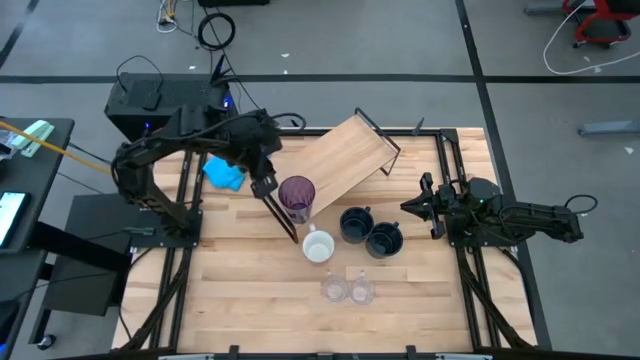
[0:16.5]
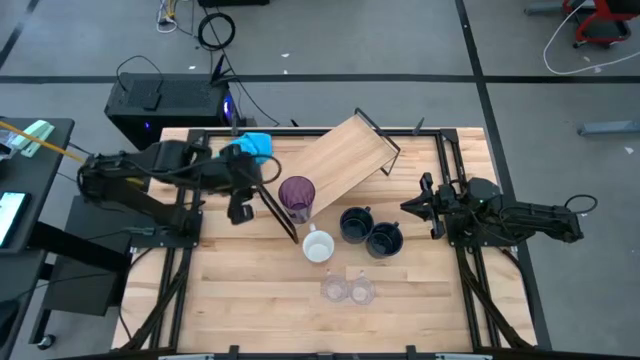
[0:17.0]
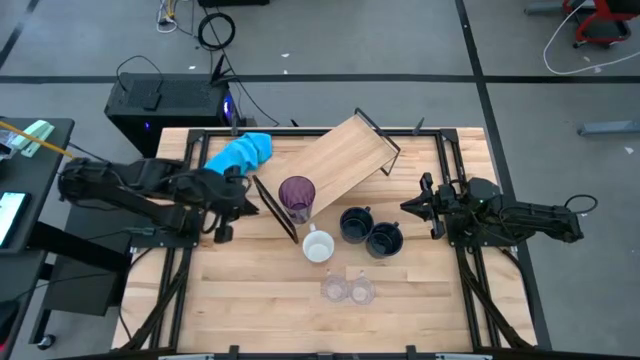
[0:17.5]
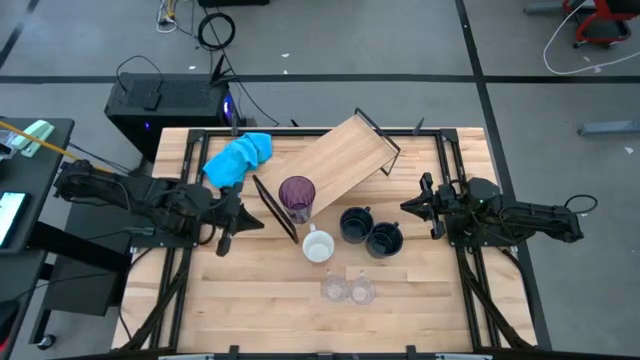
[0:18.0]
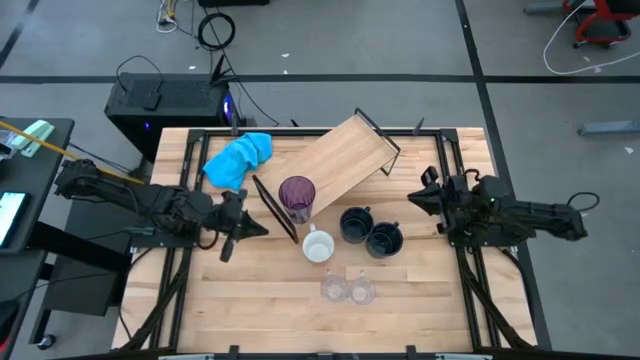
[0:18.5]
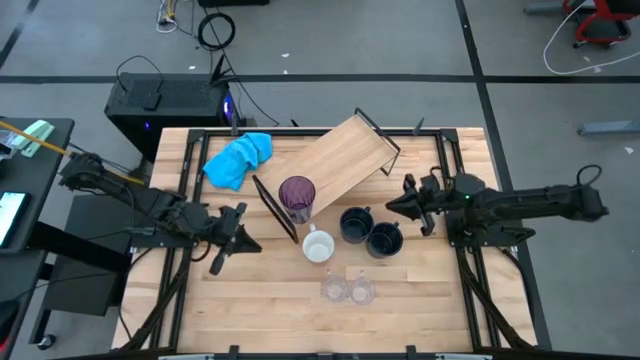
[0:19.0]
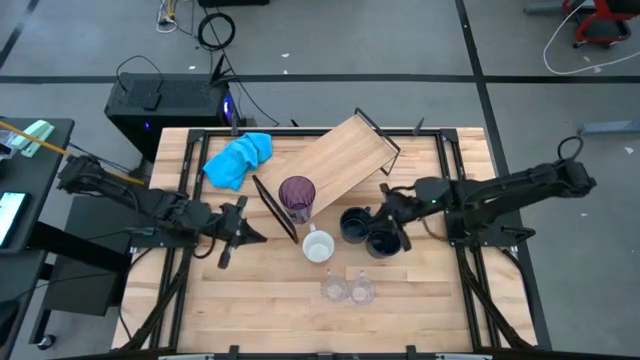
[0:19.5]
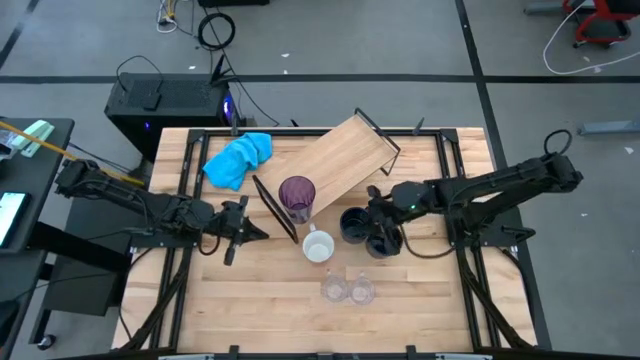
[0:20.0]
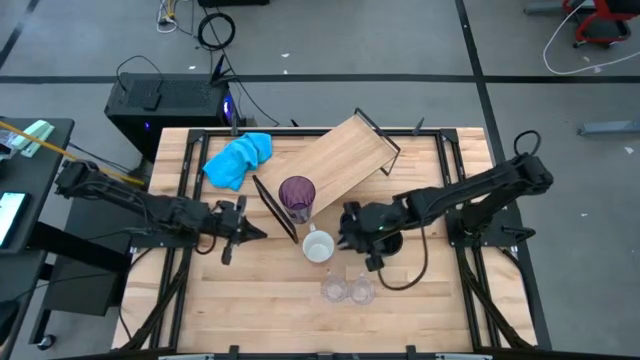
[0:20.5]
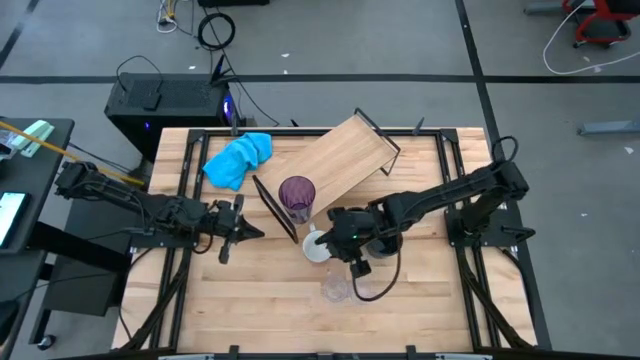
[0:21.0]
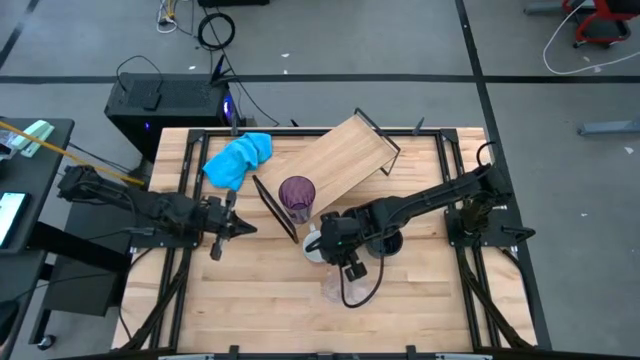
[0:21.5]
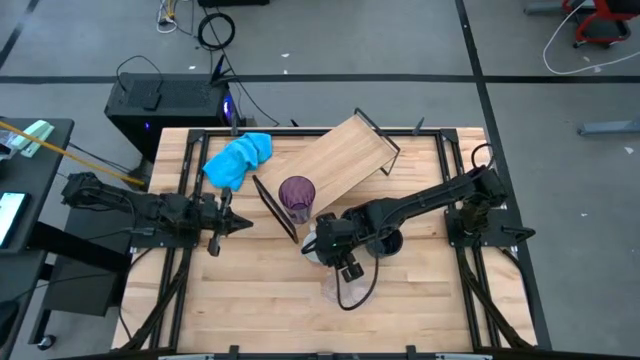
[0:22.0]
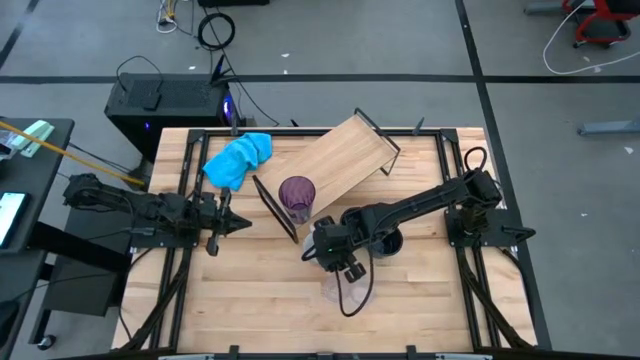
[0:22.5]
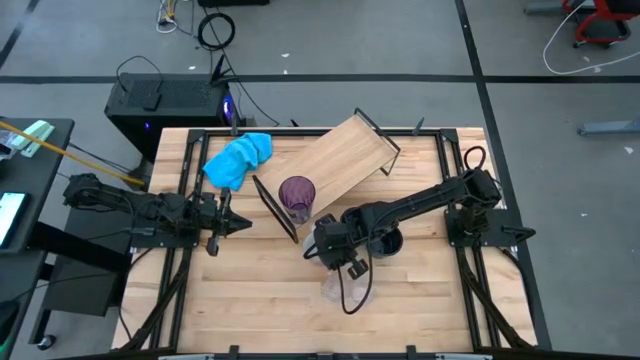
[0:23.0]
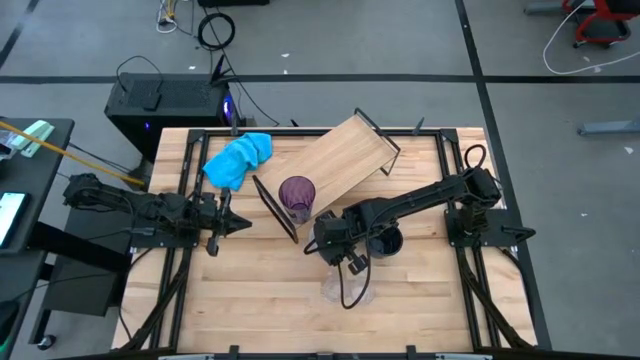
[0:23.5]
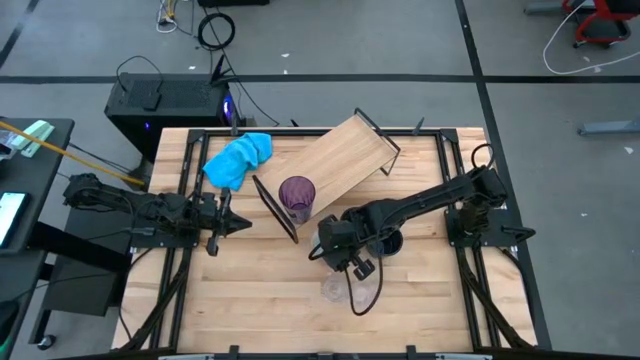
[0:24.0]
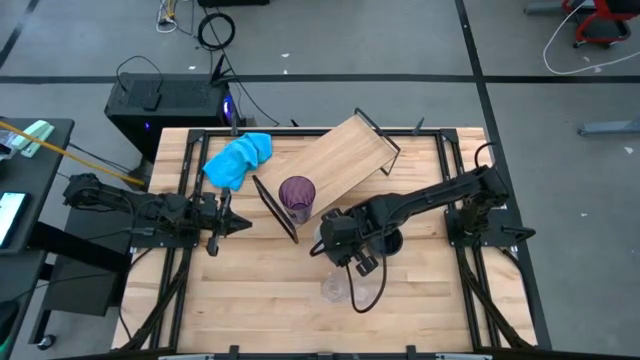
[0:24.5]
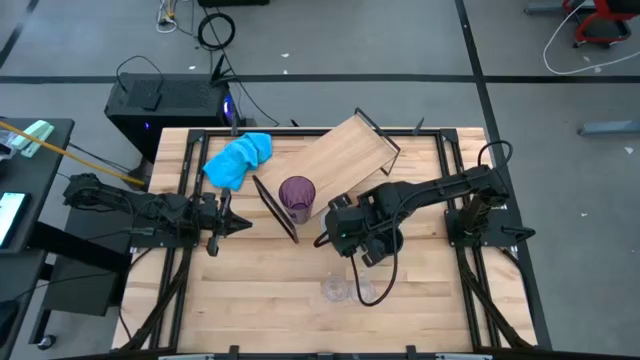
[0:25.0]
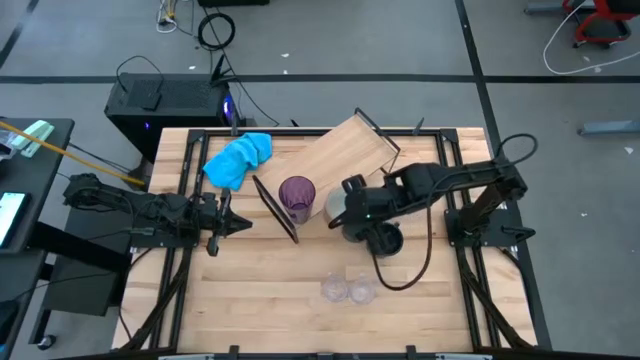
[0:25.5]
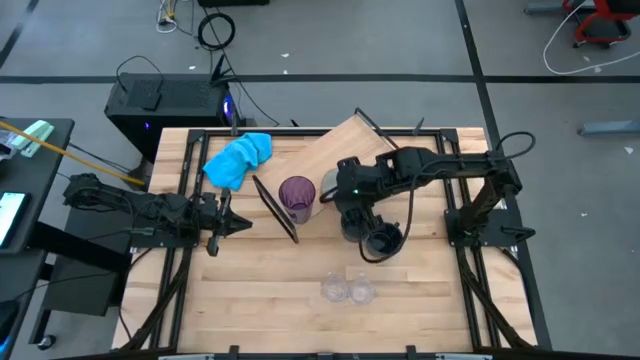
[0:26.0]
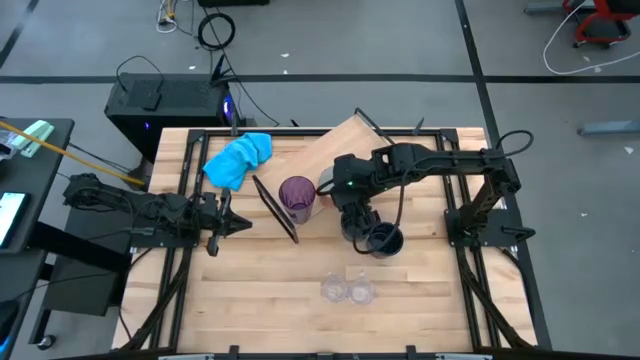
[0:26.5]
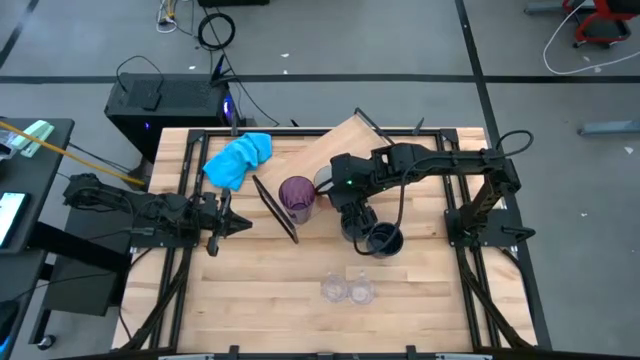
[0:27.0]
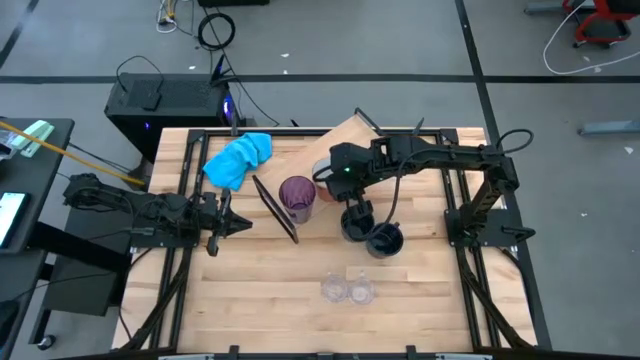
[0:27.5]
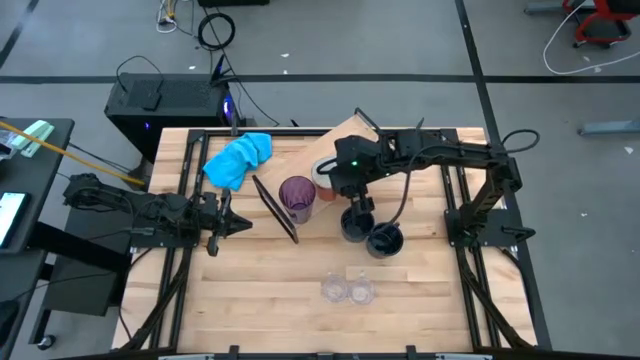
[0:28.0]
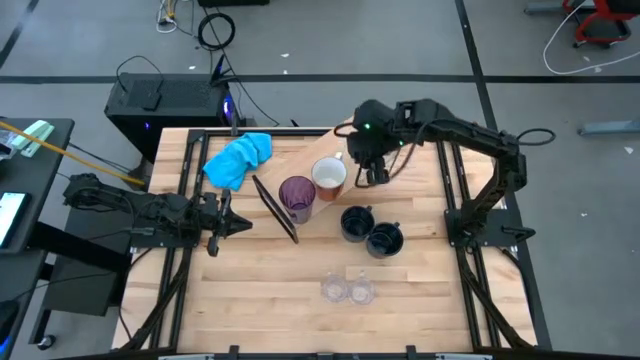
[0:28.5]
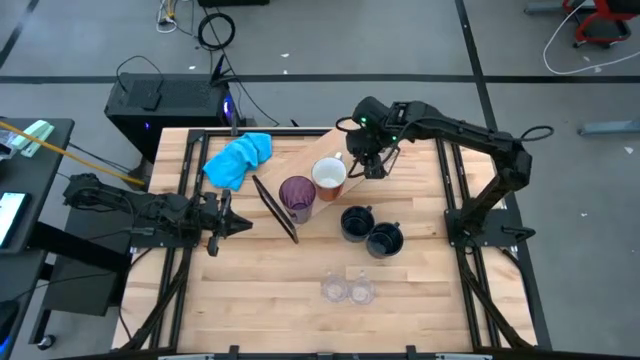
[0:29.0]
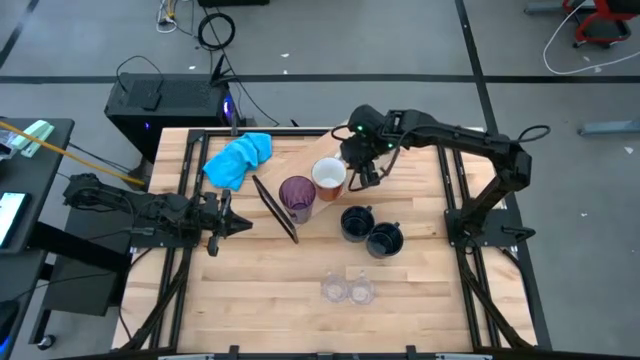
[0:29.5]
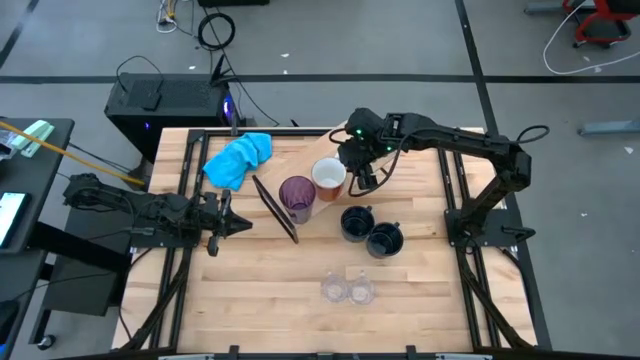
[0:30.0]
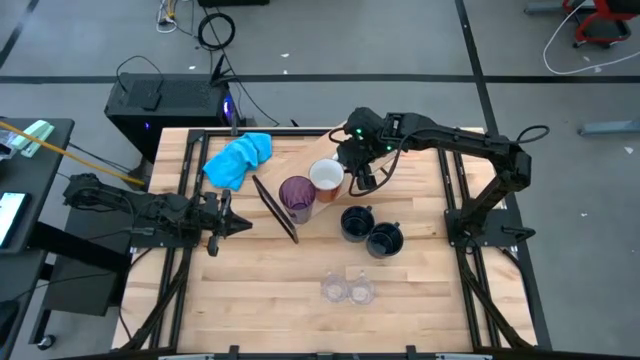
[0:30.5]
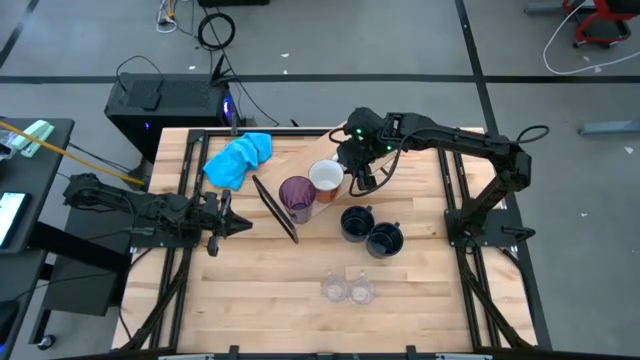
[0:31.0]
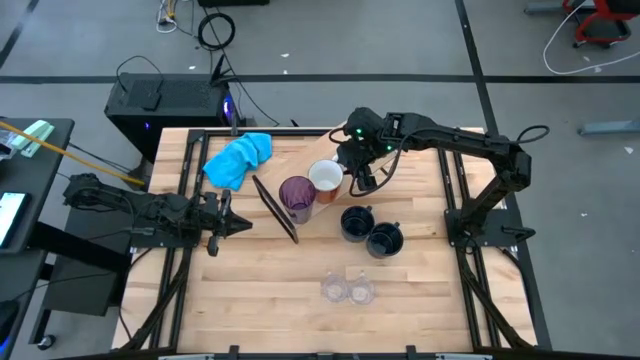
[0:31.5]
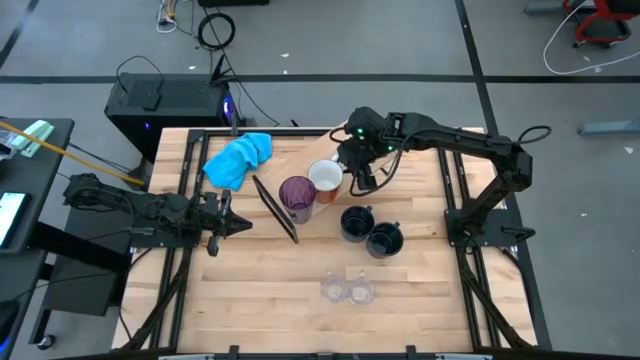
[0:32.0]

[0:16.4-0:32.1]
Task: Stack small to large cups/mugs on shelf
Put the orange mug on the shelf

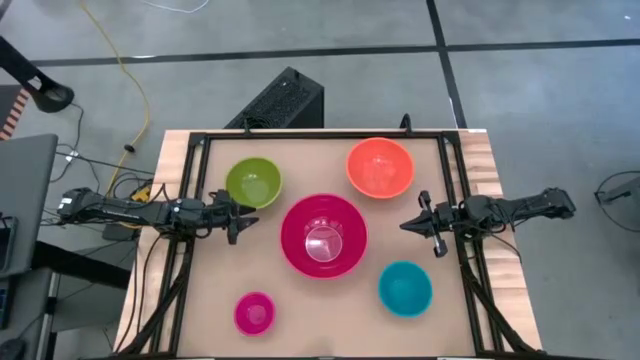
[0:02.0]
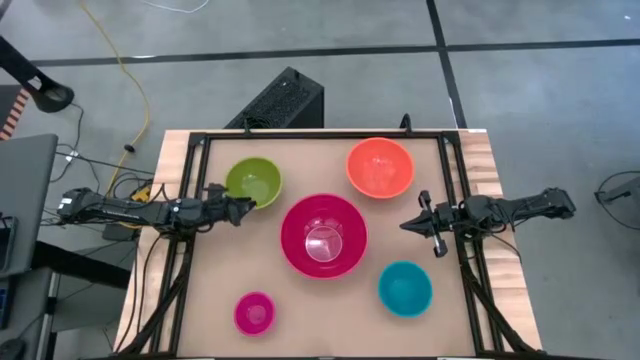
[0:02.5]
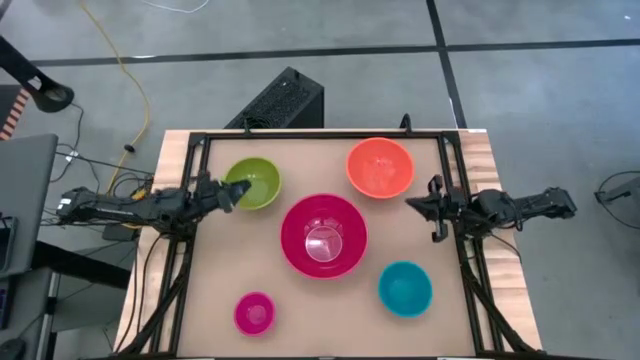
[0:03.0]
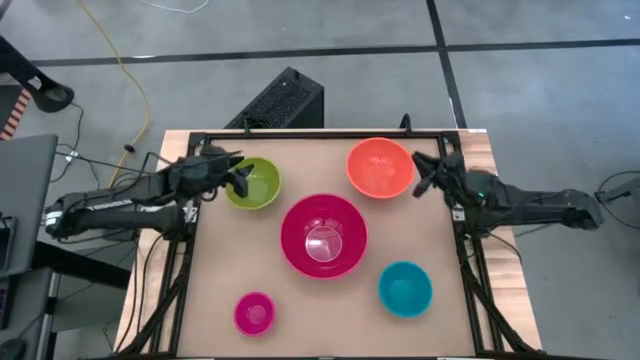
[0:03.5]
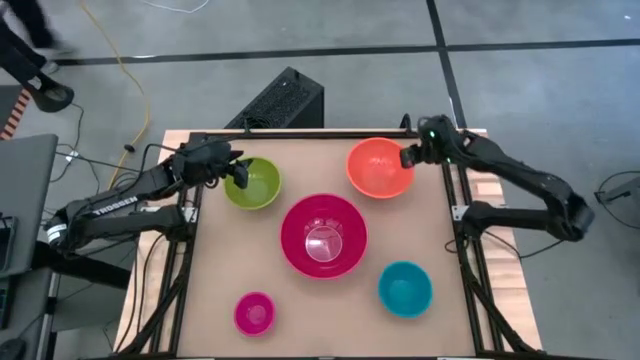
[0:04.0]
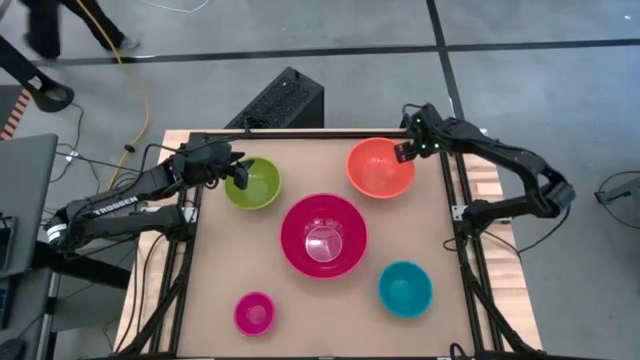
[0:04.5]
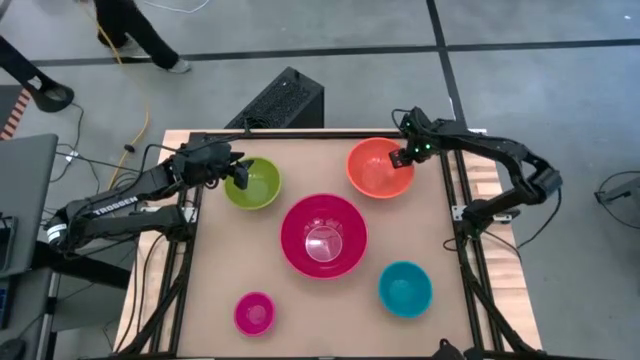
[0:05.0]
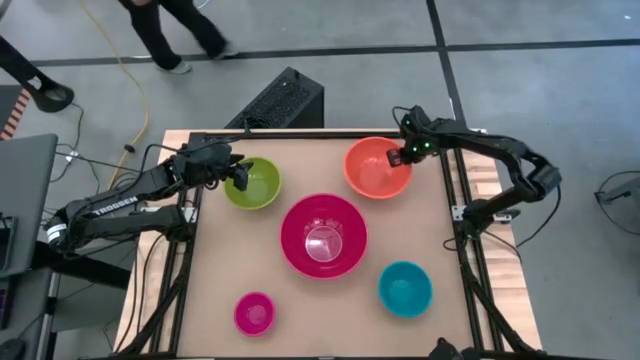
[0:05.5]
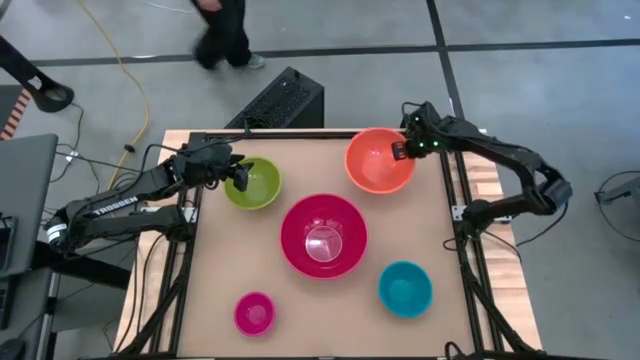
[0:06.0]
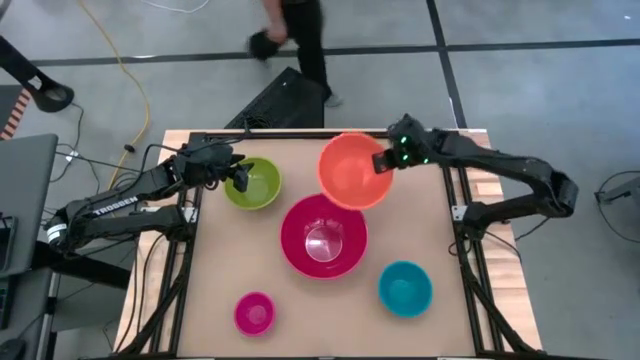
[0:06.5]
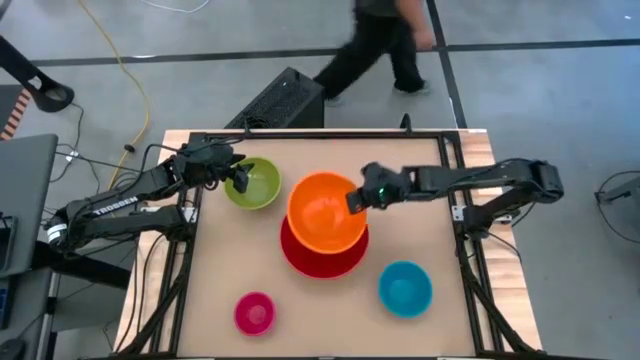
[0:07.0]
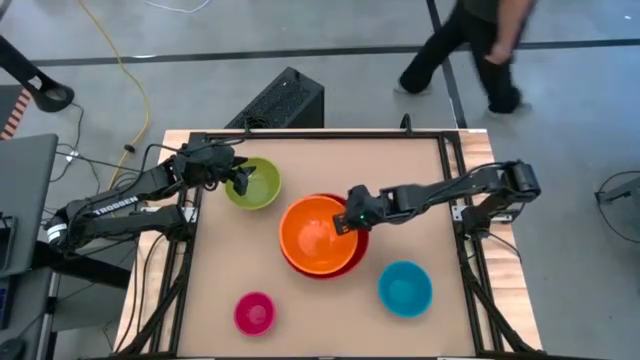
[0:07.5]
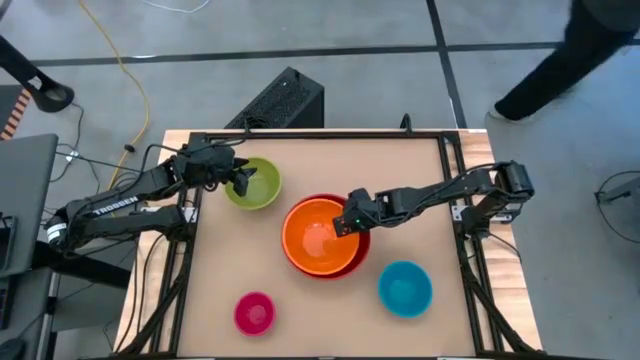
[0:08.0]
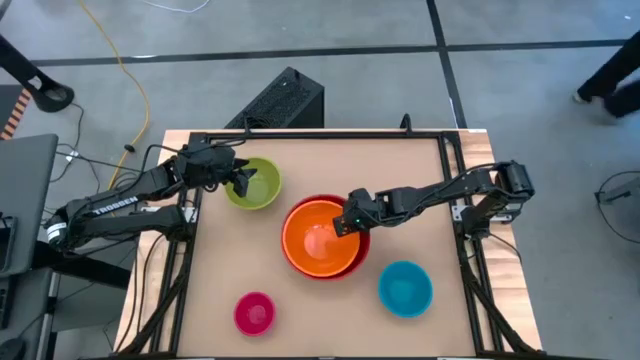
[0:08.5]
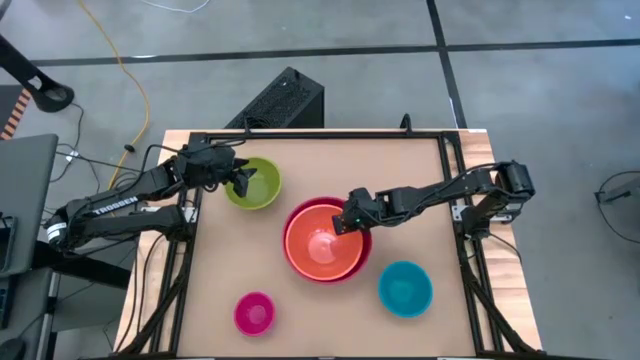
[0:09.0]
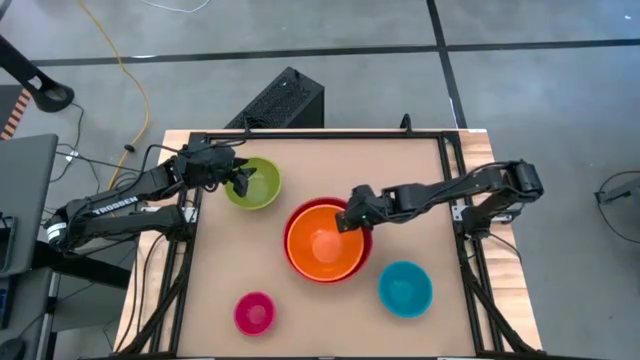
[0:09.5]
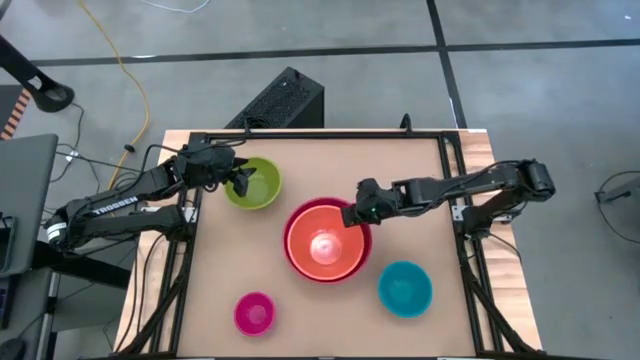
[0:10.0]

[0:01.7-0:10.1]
Task: Nest bowls inside each other by size order
Stack the orange bowl on top of the red bowl
